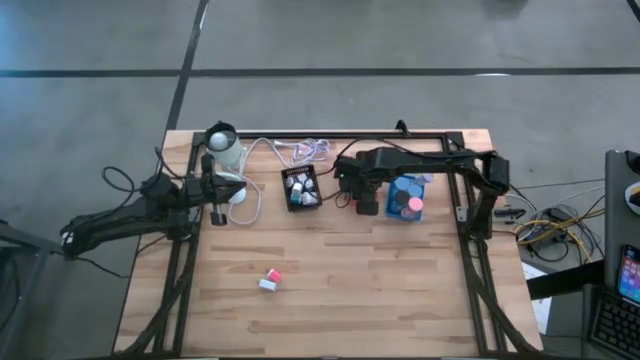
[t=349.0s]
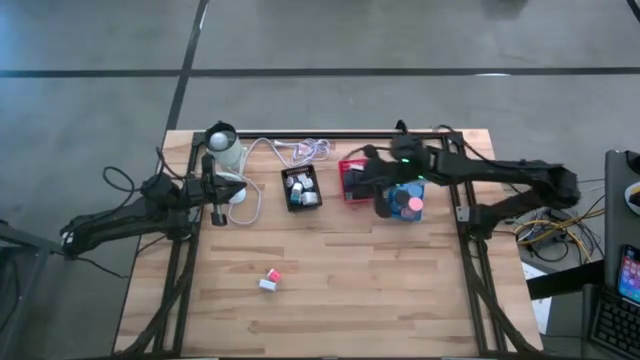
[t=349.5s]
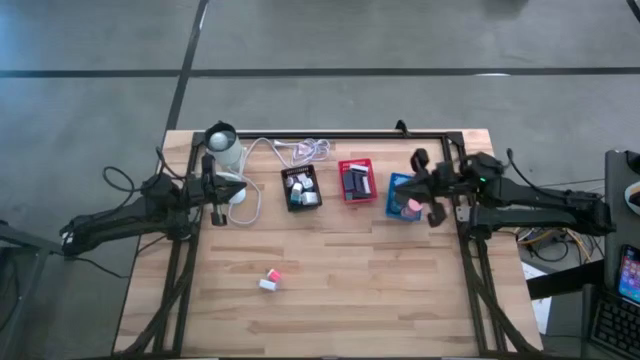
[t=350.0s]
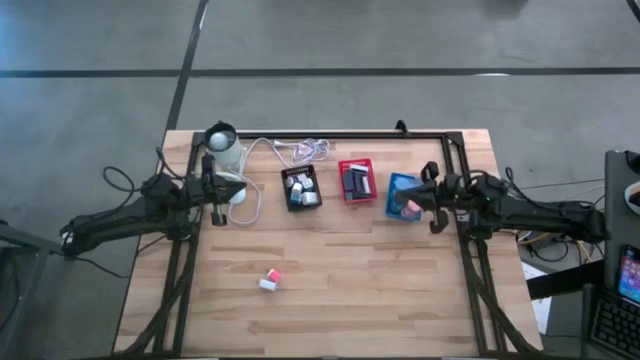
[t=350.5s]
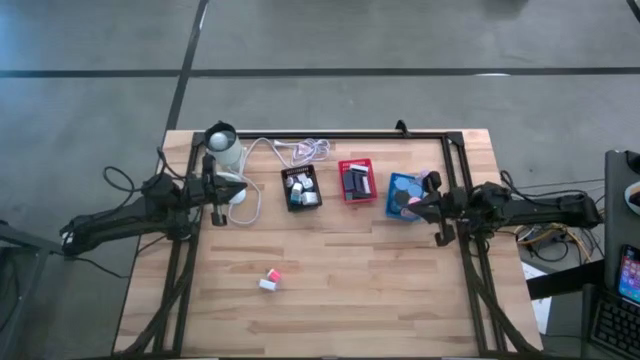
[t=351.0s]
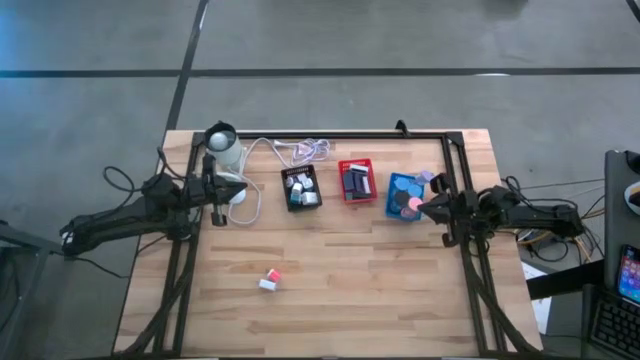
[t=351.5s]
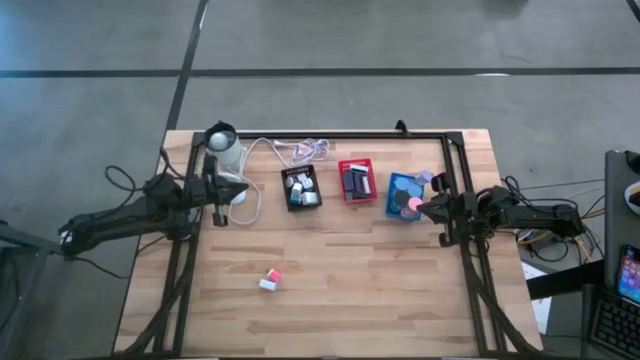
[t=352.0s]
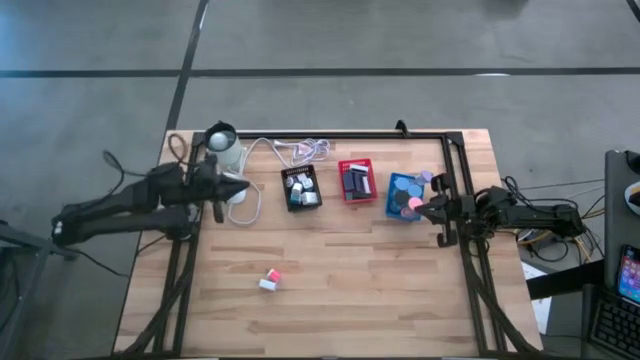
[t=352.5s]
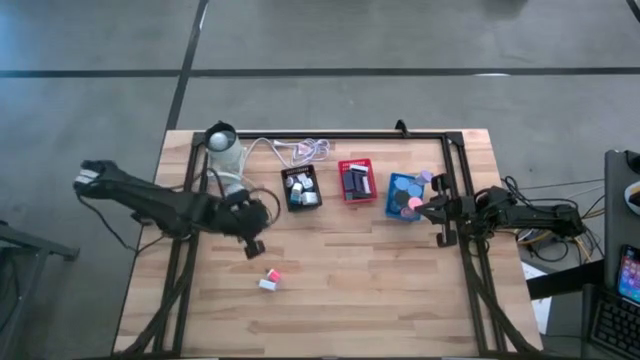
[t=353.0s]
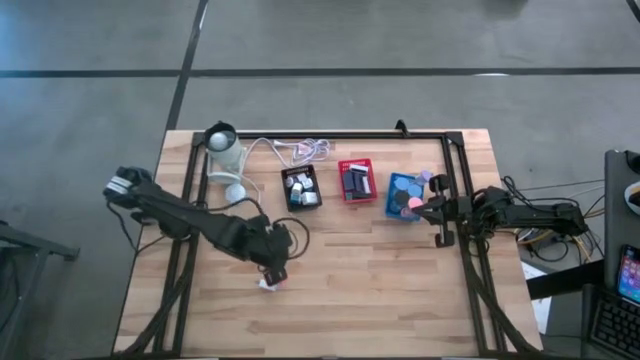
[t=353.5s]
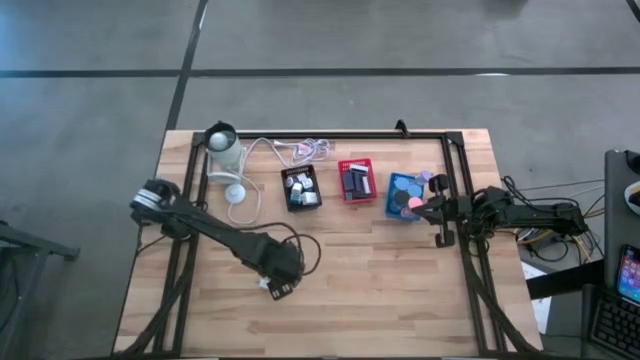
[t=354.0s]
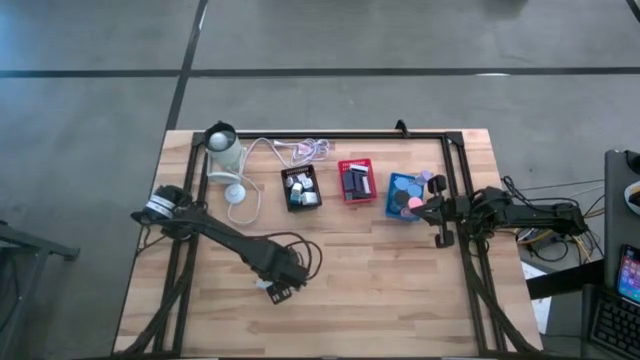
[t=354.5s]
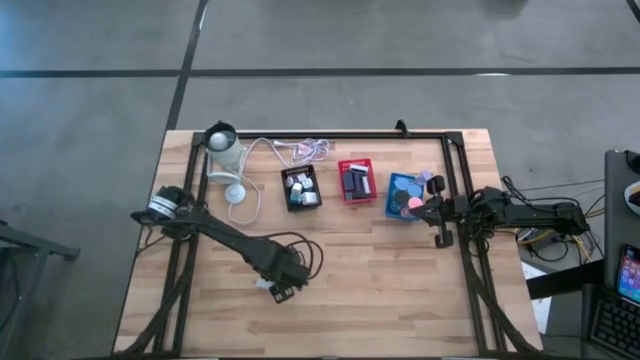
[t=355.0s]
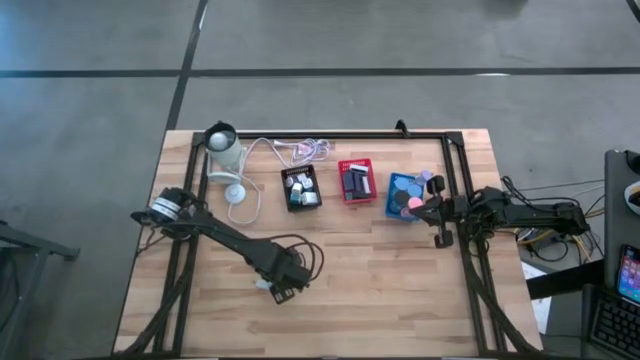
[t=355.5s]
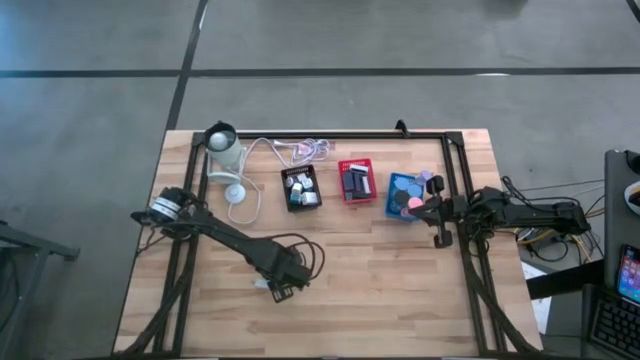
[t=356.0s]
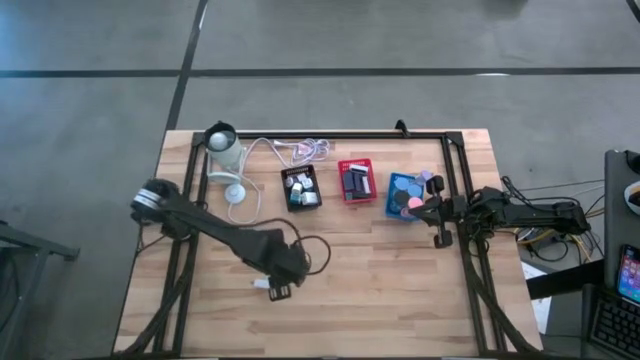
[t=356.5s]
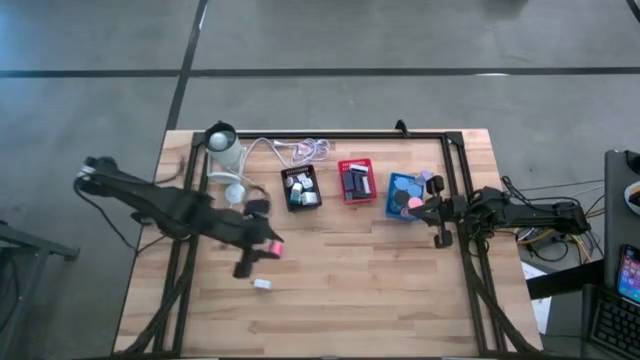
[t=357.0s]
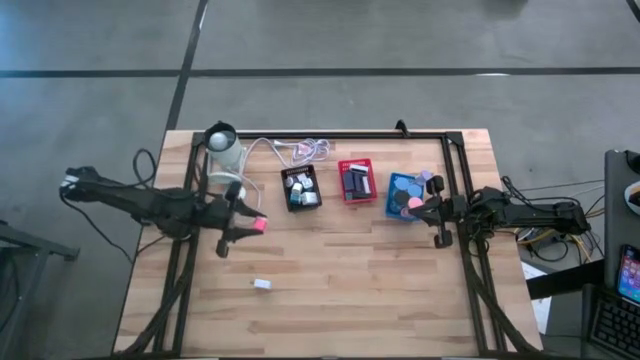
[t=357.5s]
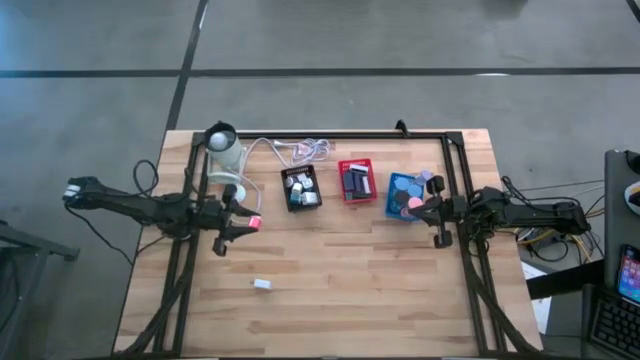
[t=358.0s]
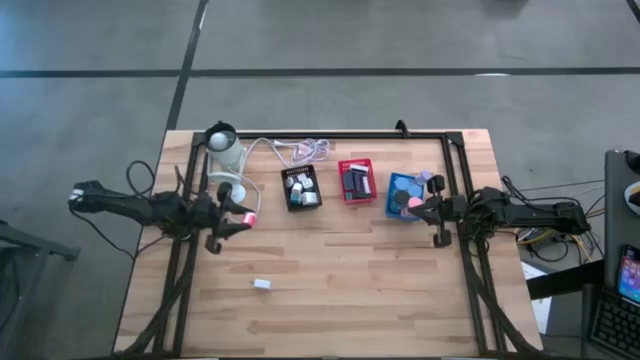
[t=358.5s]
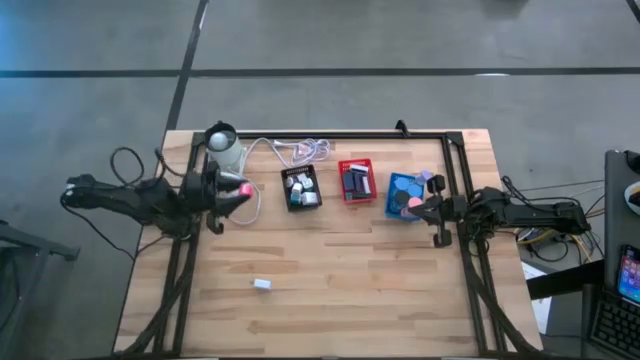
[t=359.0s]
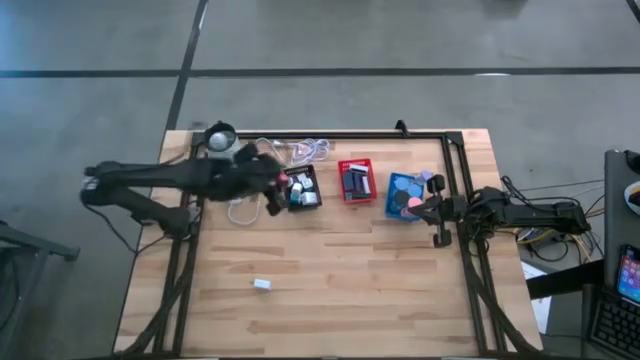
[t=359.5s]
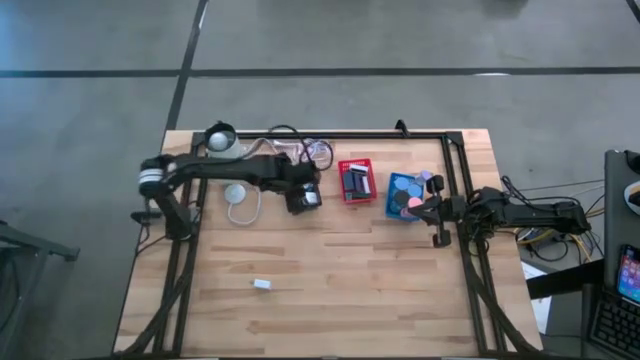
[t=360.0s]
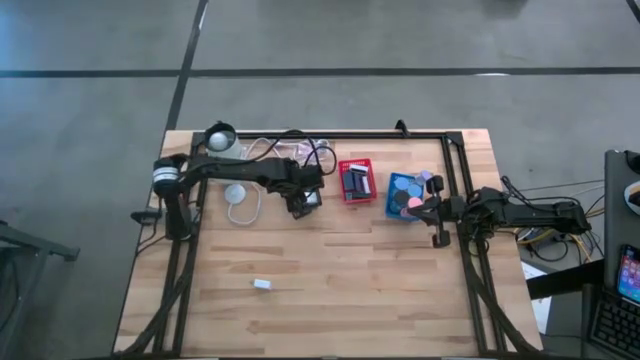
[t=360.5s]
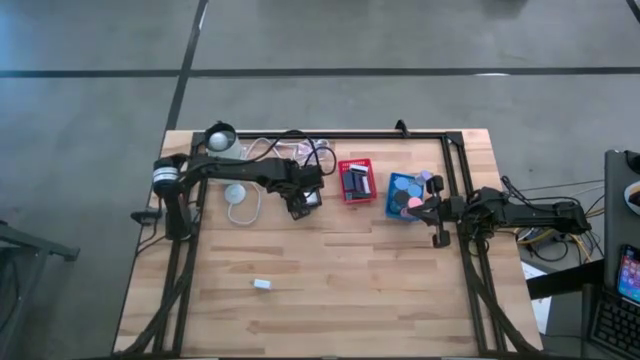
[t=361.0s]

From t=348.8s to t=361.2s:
Task: Pick & Place Office items
Put the pink charger adapter into the black bin

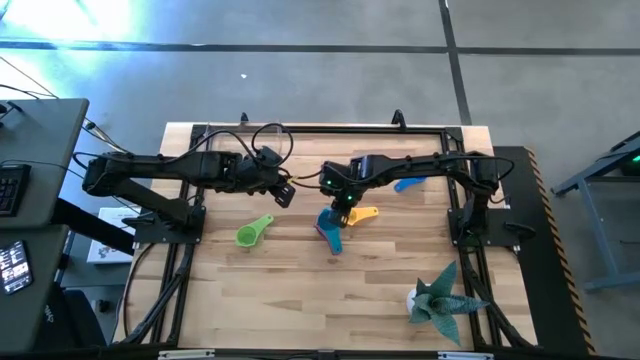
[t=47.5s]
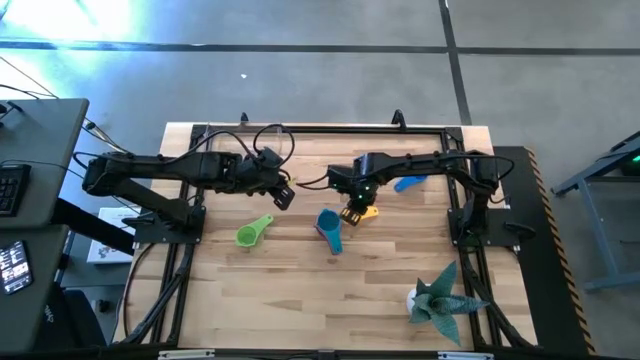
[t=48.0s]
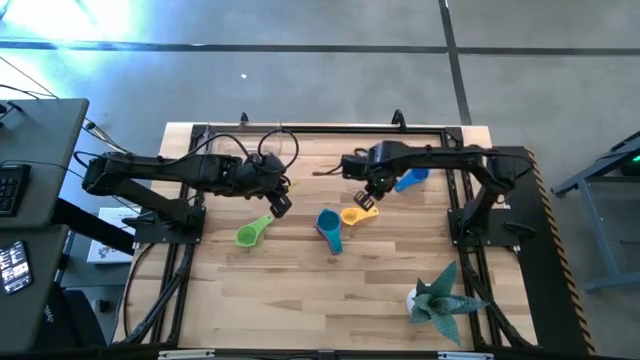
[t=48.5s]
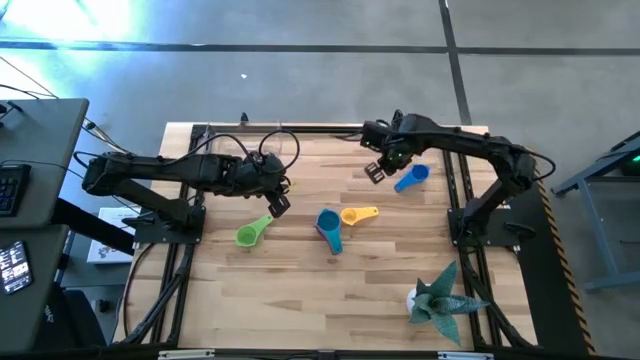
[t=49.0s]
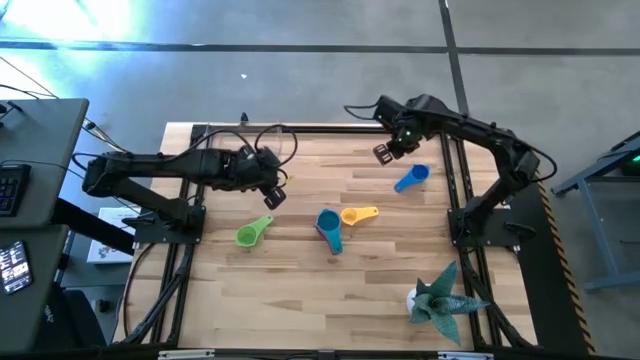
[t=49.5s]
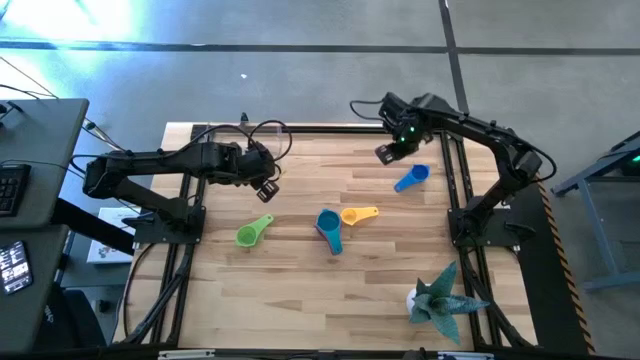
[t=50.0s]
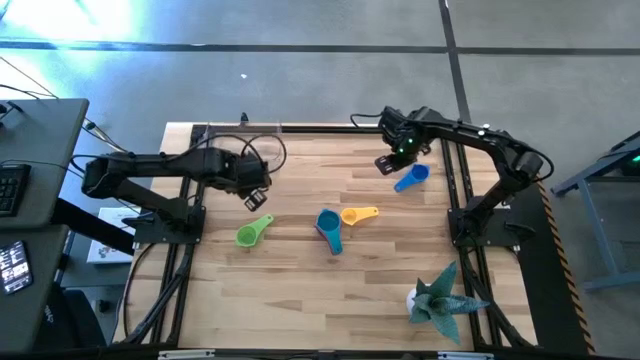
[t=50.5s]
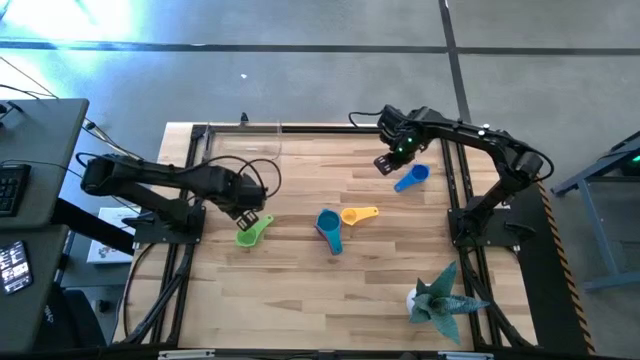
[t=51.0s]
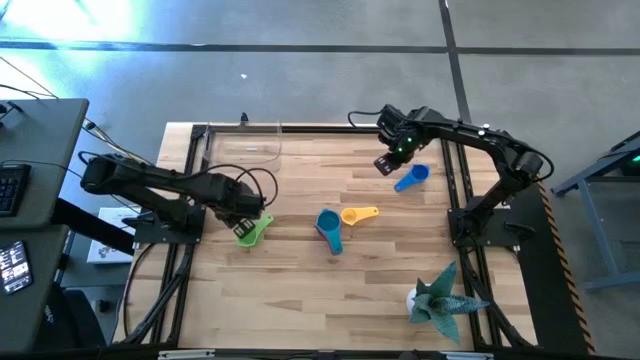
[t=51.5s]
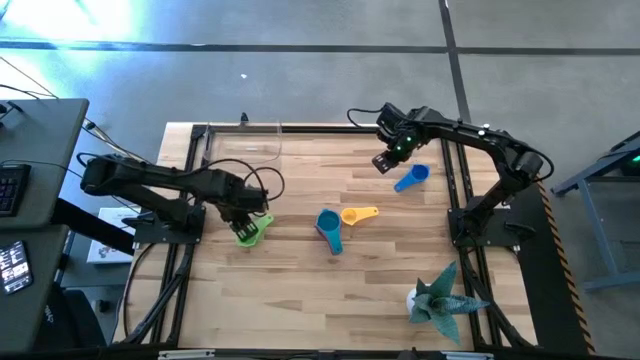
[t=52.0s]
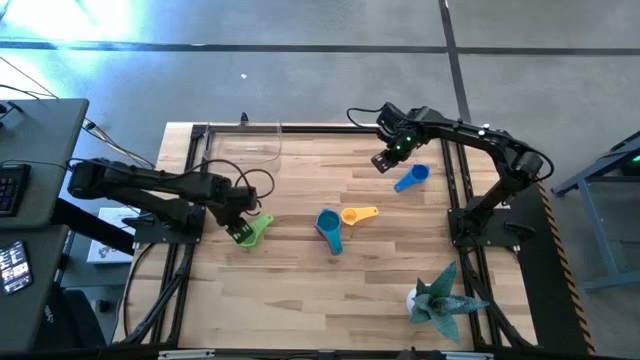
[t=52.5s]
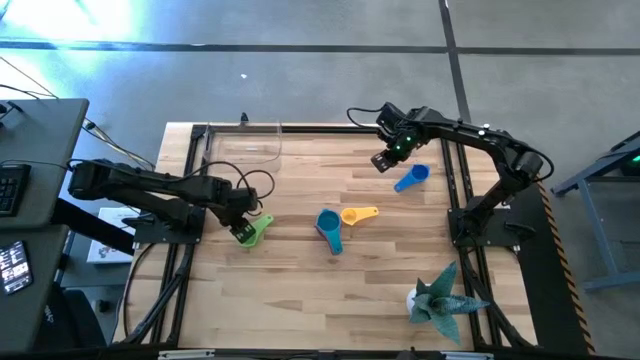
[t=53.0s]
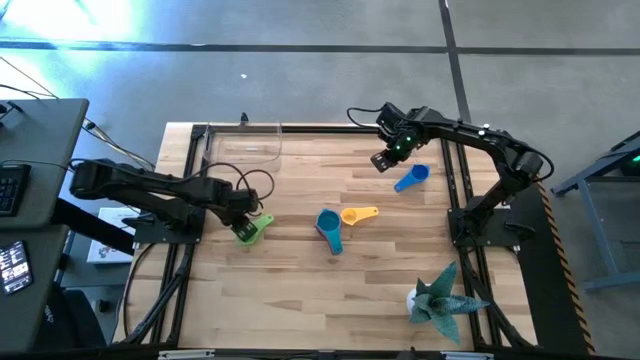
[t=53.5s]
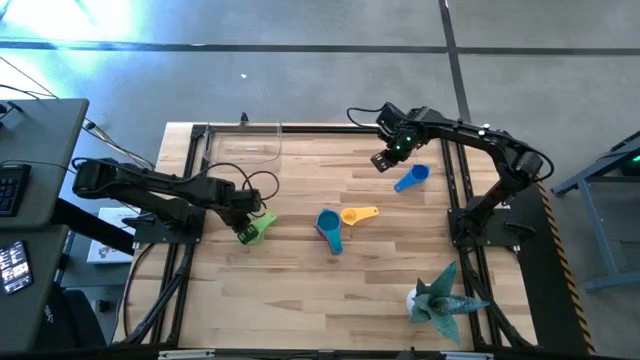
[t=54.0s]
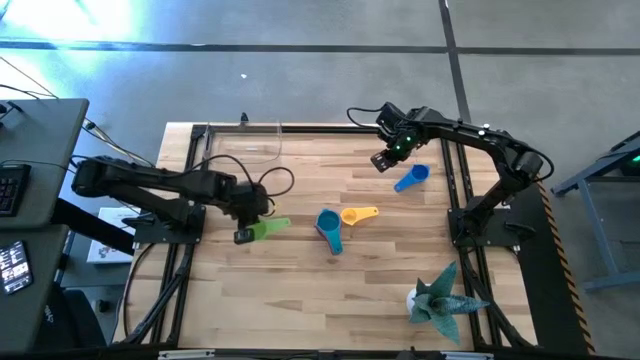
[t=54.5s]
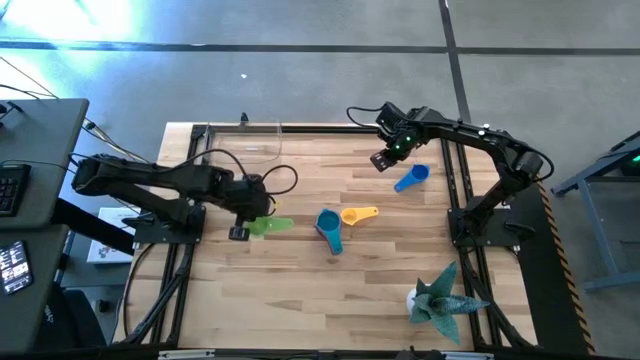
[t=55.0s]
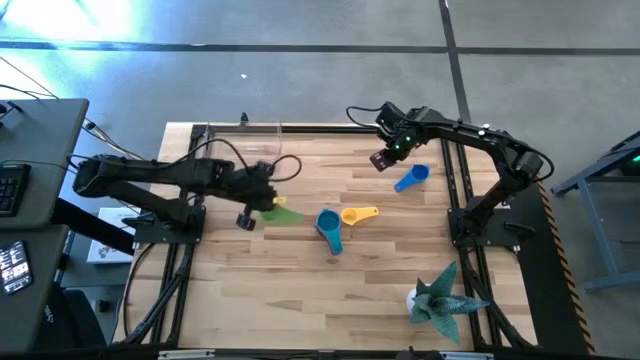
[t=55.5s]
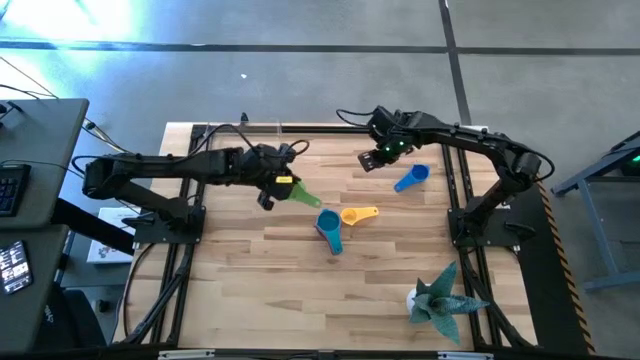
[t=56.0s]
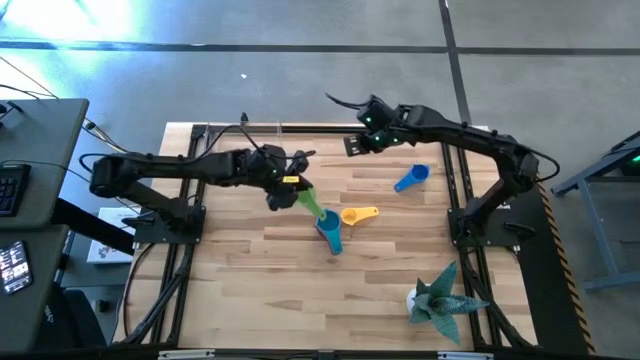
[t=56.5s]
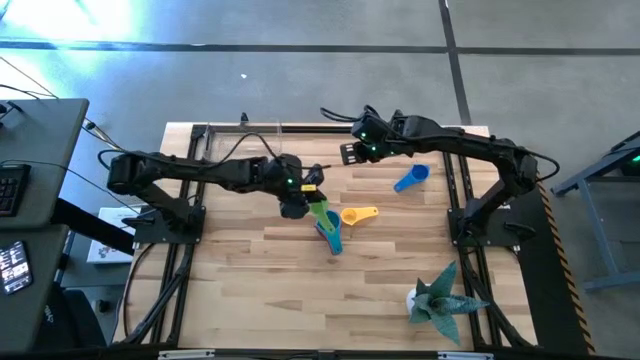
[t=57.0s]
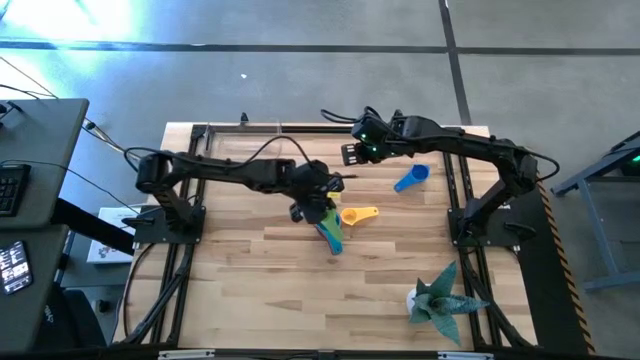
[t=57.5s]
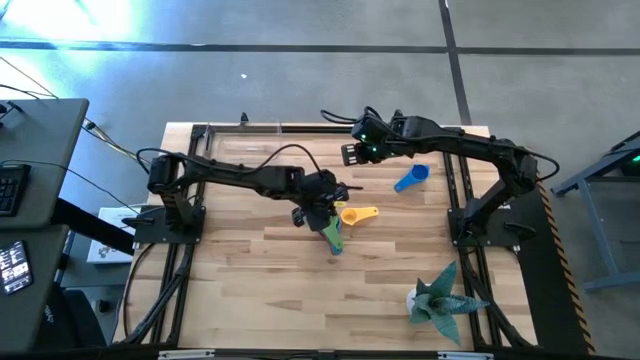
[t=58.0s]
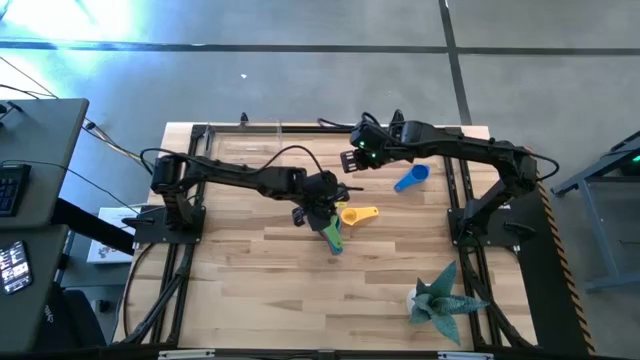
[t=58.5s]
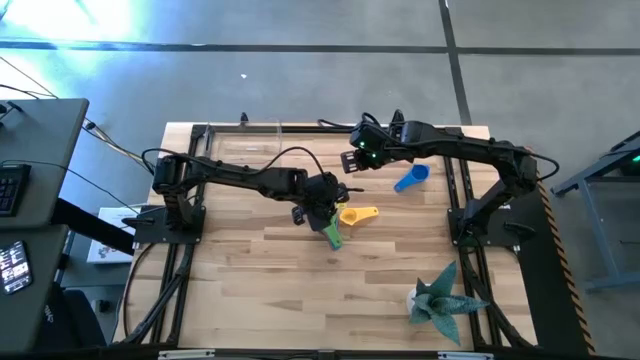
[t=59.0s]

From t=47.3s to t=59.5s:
Task: Nest measuring cups in basket
Stack the green measuring cup on top of the light blue measuring cup
